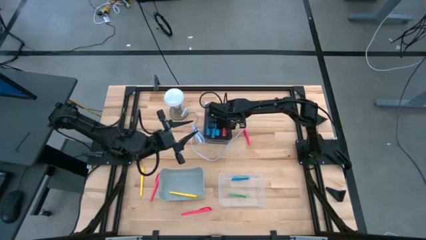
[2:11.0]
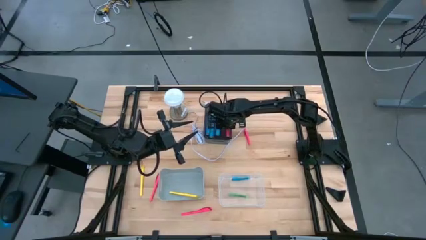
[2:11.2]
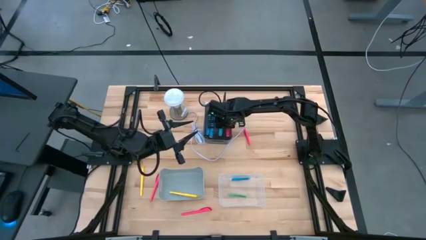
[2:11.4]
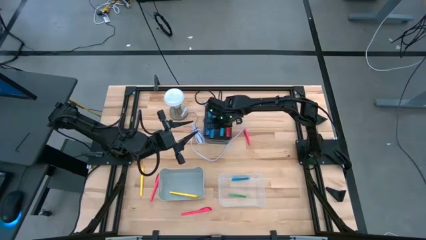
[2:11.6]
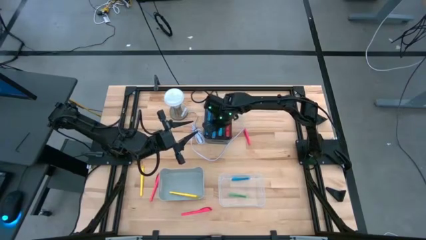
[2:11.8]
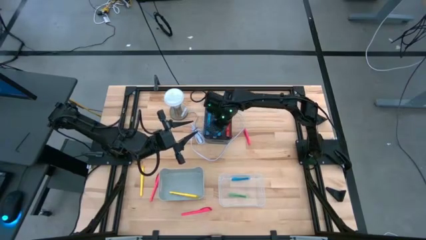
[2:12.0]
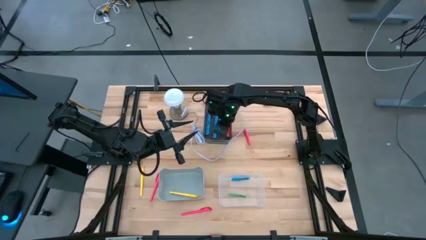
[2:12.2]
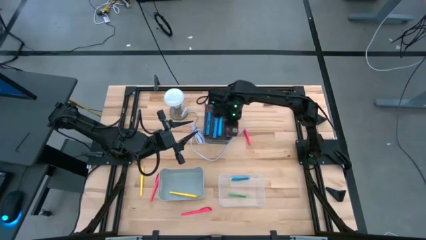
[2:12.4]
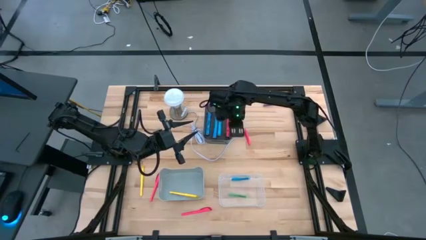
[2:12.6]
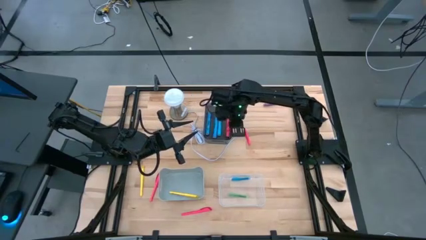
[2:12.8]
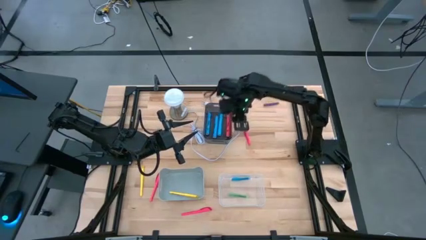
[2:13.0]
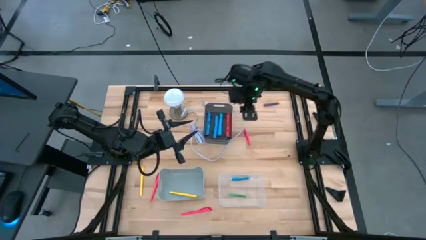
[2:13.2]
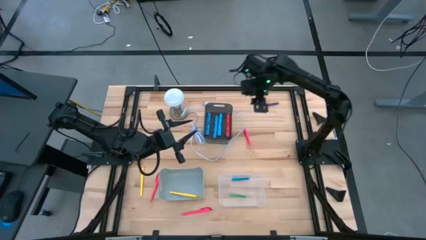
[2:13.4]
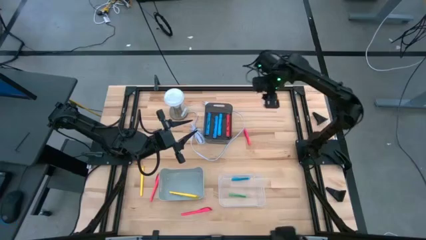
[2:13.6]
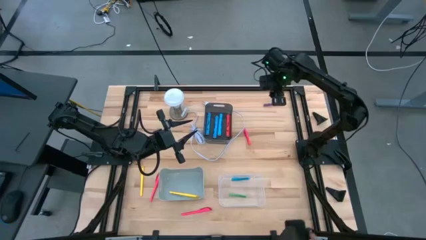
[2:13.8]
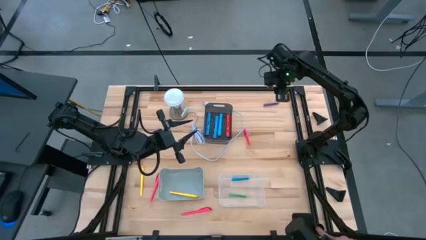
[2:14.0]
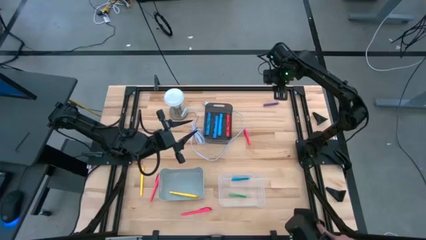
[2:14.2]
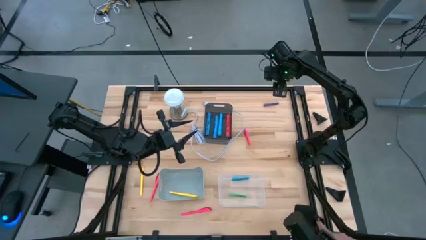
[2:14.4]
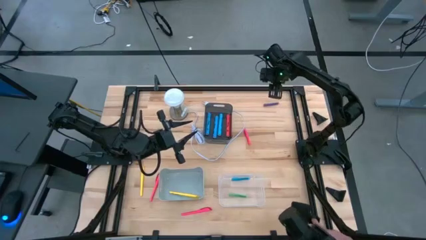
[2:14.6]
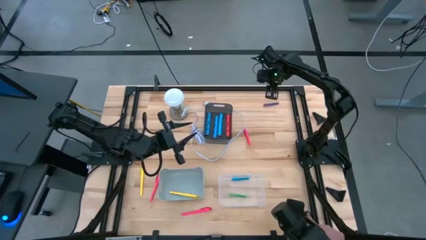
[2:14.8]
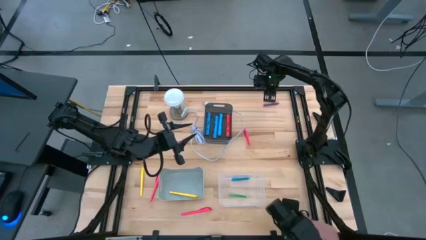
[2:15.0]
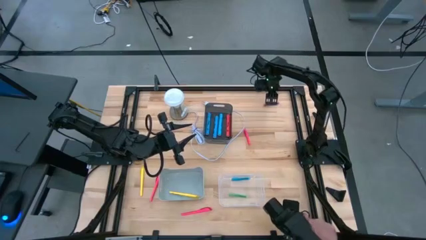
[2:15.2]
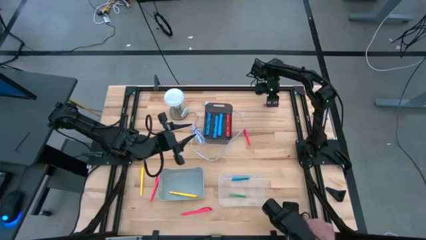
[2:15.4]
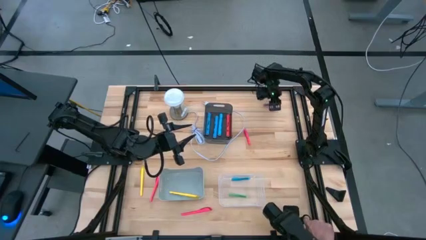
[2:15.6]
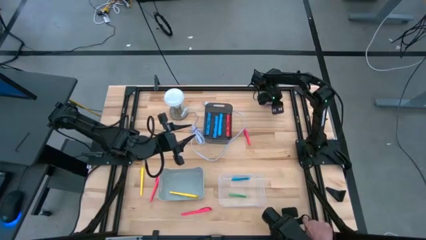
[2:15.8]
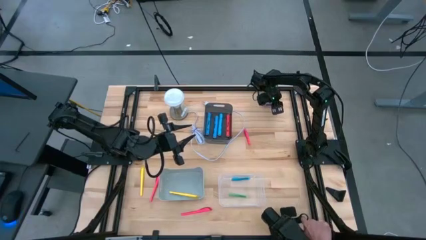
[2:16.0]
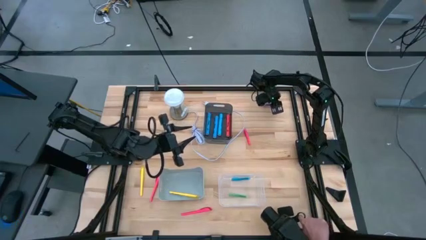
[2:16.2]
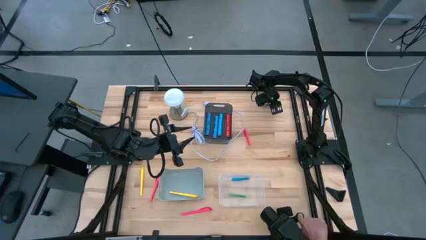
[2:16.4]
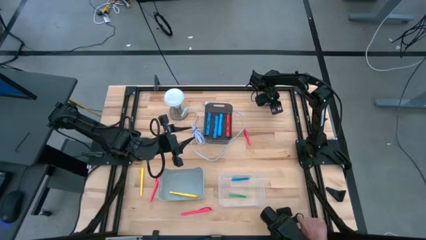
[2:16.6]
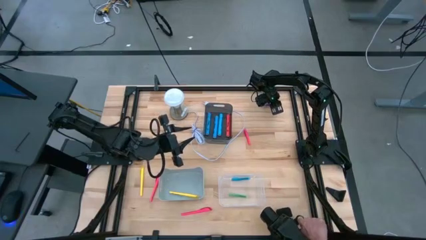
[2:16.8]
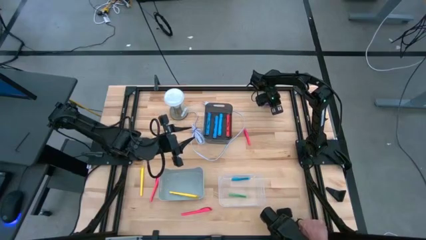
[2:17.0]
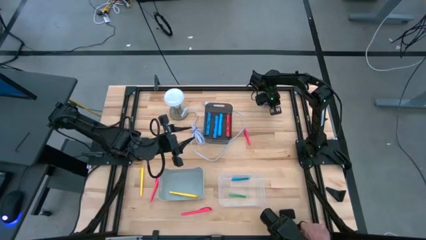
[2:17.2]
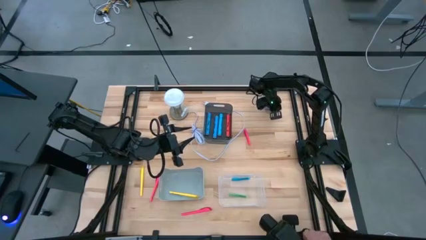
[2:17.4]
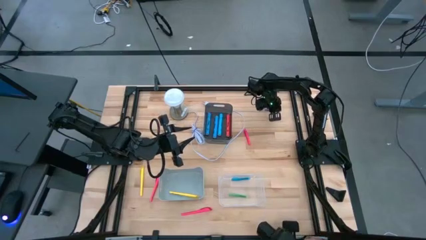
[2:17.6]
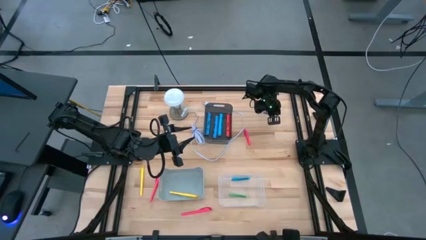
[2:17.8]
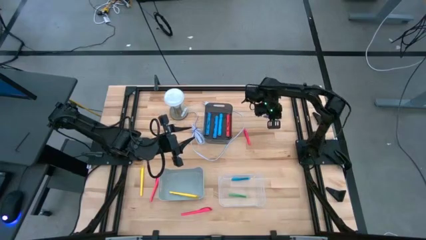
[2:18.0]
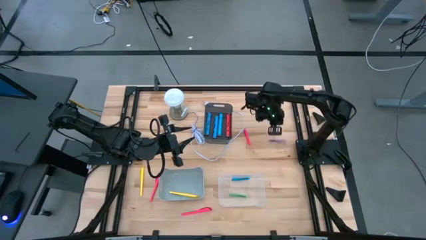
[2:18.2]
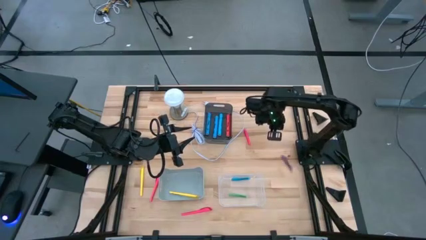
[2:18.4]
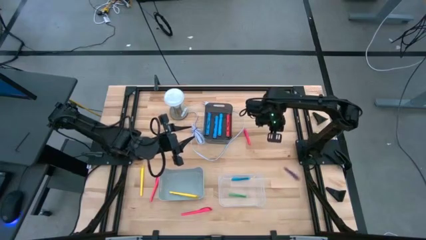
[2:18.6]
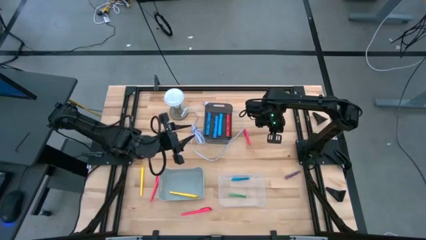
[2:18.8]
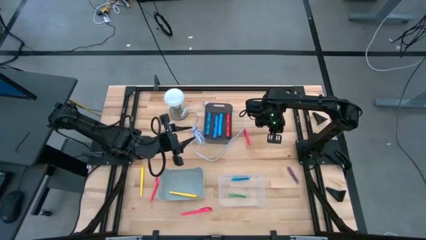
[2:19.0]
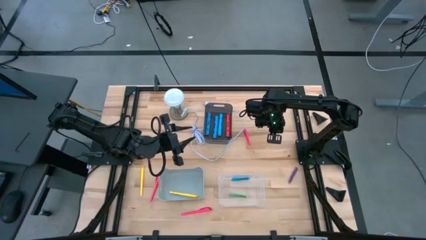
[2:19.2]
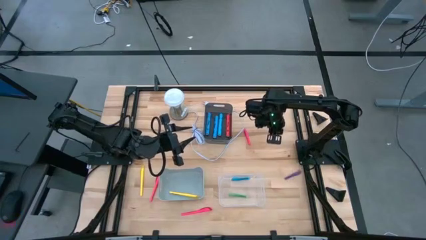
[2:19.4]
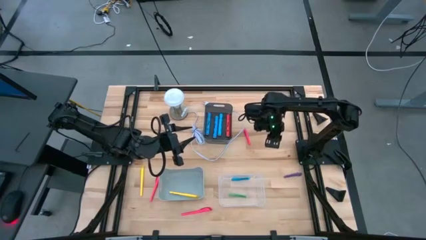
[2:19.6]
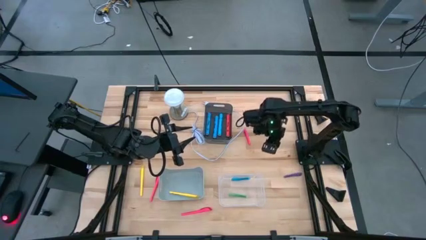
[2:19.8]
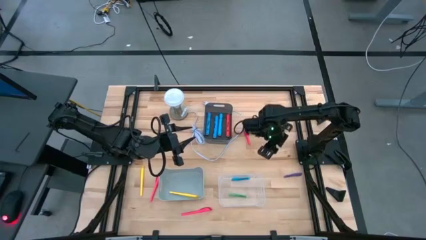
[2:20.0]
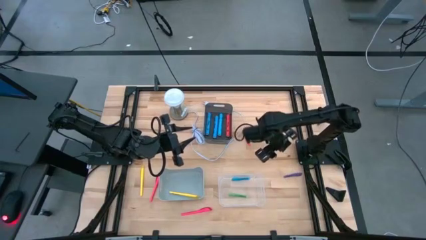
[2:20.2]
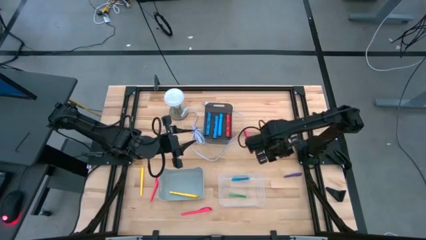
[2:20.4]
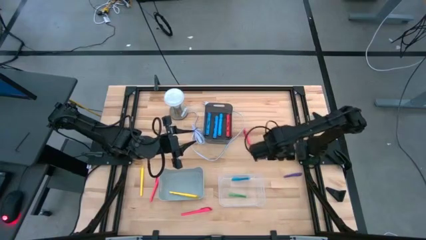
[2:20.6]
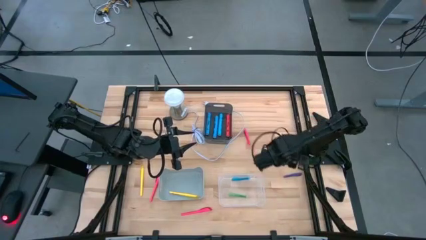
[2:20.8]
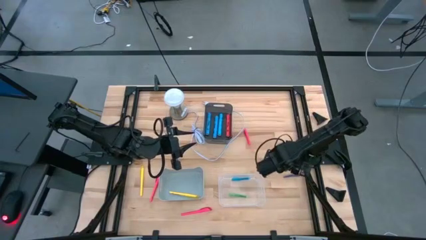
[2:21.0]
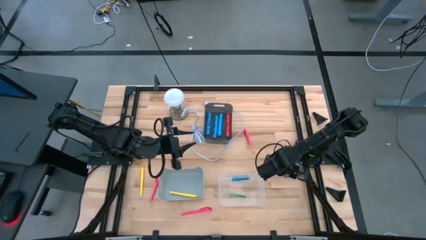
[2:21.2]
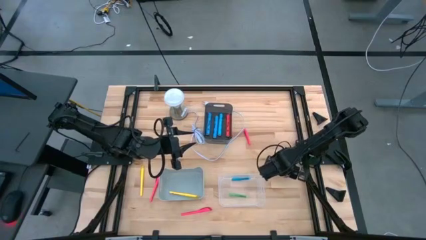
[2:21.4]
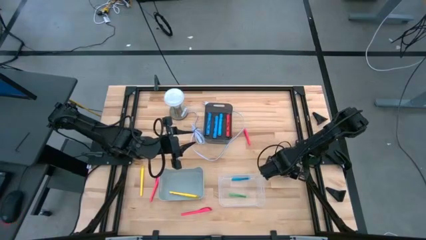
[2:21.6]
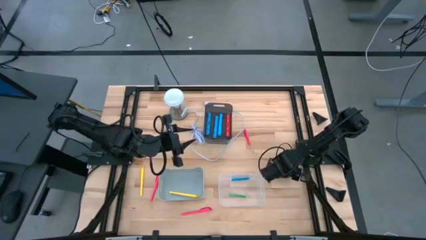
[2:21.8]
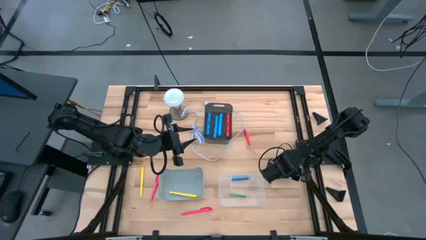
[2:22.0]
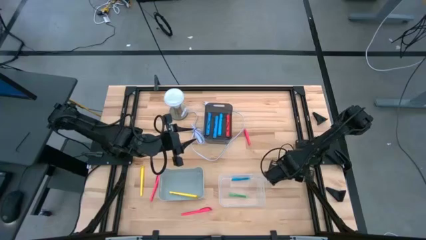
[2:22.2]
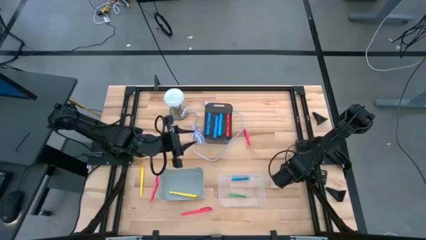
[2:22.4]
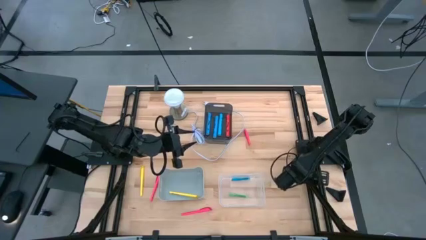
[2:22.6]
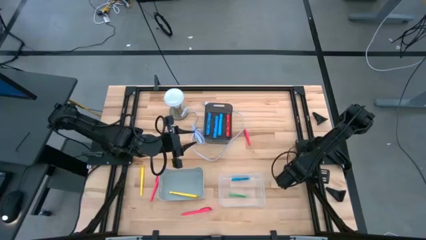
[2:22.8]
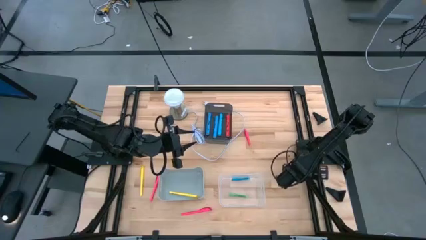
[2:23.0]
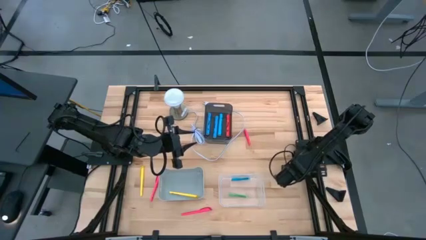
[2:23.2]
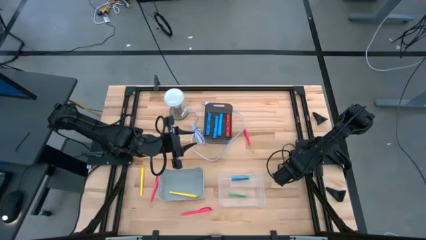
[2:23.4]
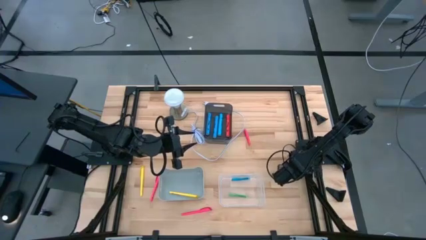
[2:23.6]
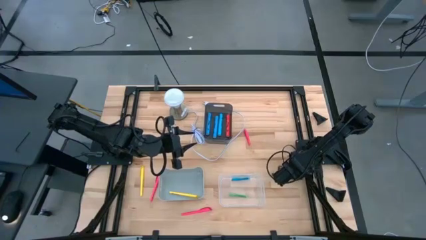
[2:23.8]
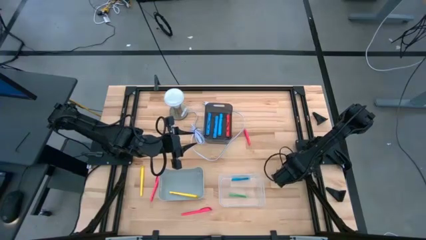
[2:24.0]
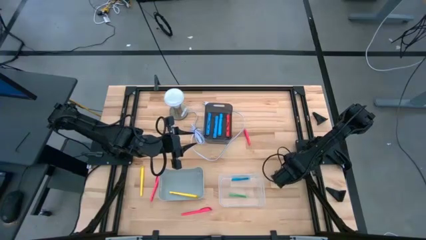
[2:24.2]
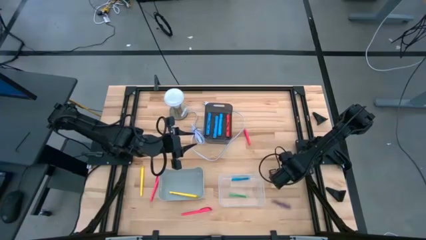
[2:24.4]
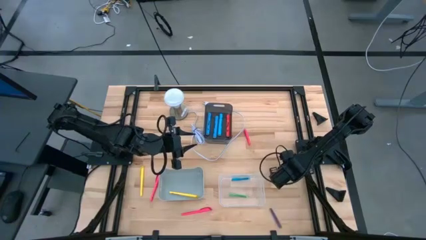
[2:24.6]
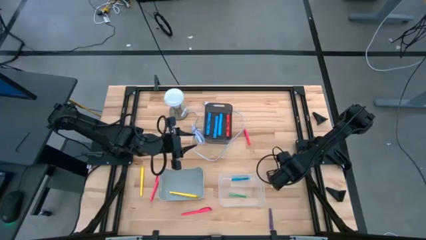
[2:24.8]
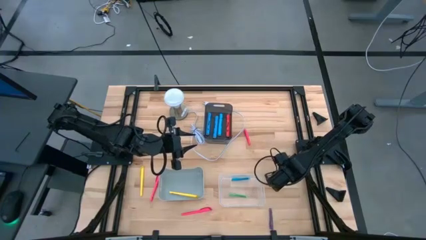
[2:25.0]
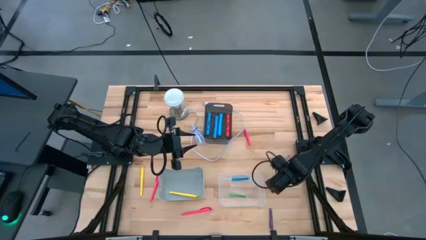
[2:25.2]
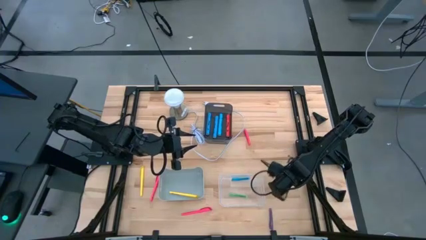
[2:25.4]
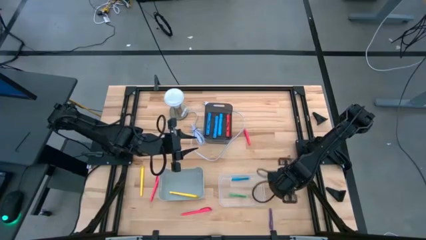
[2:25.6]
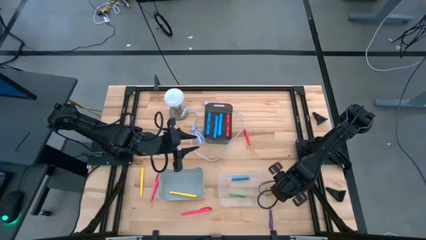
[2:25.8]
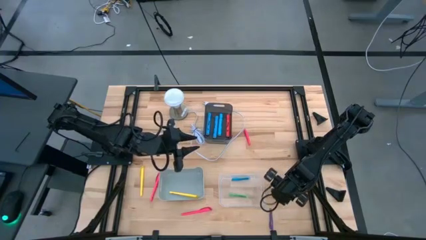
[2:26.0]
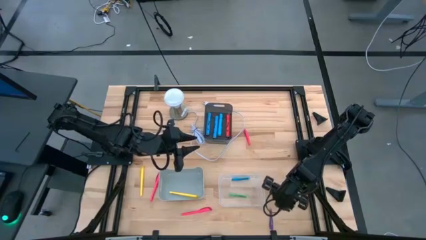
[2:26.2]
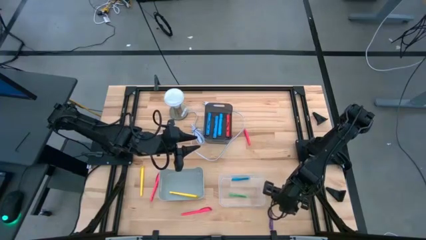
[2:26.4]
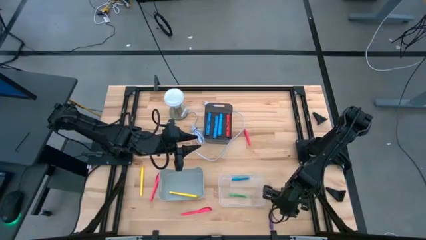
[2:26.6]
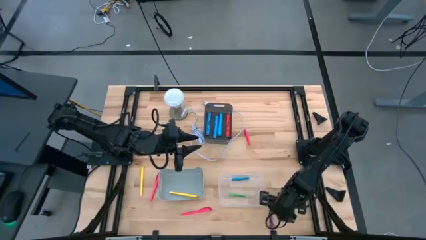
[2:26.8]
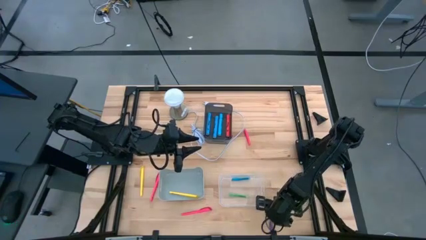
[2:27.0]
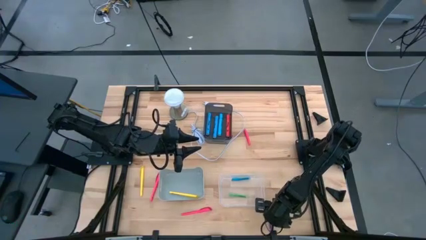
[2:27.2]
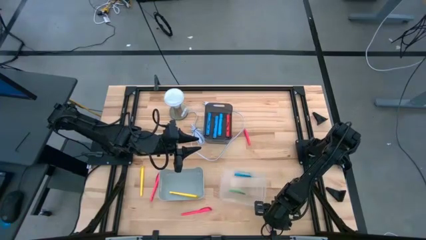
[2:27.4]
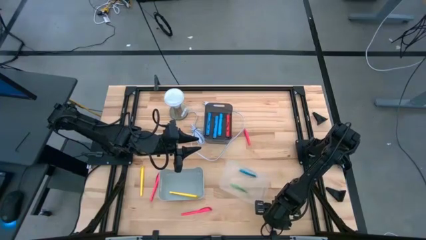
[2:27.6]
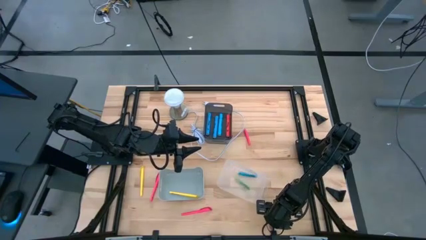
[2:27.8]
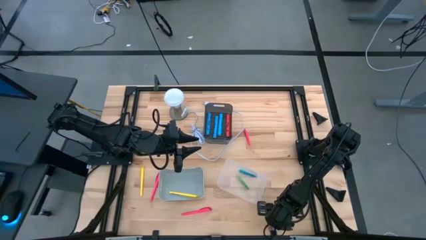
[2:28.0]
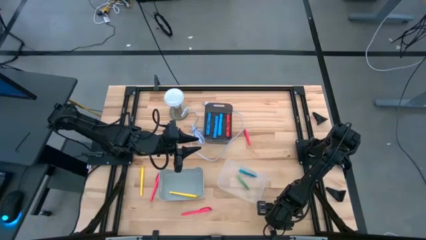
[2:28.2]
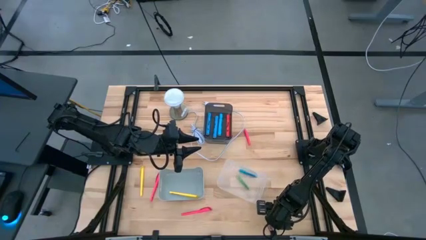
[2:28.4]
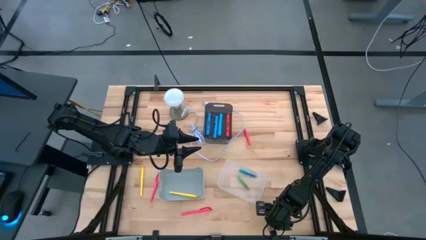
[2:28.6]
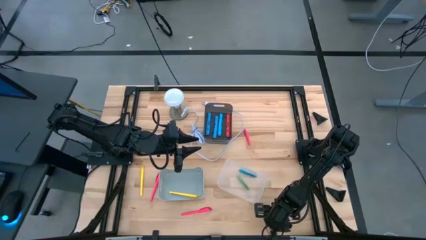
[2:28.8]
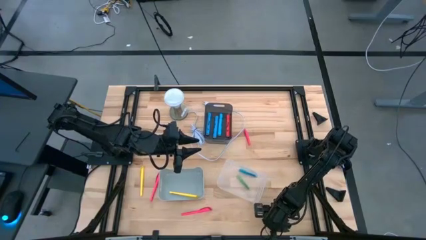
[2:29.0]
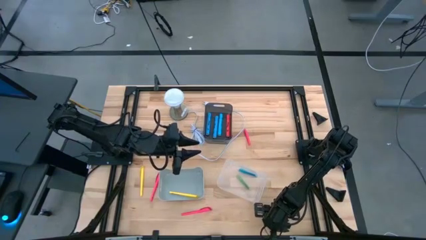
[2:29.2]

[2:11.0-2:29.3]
Task: Pick & Place Markers
Put the purple pen into the transparent bin
